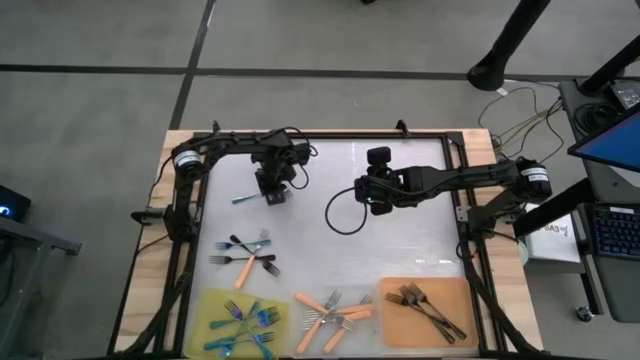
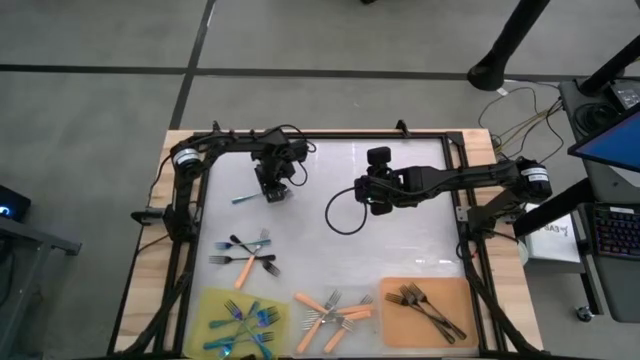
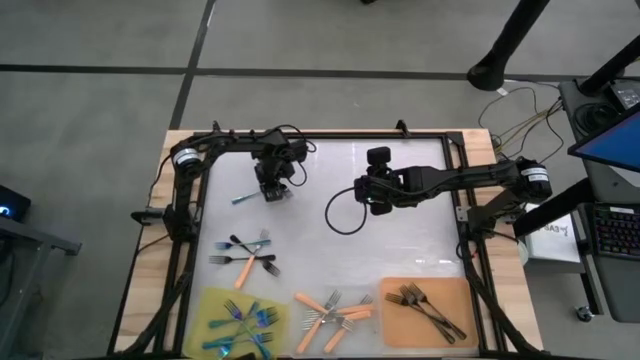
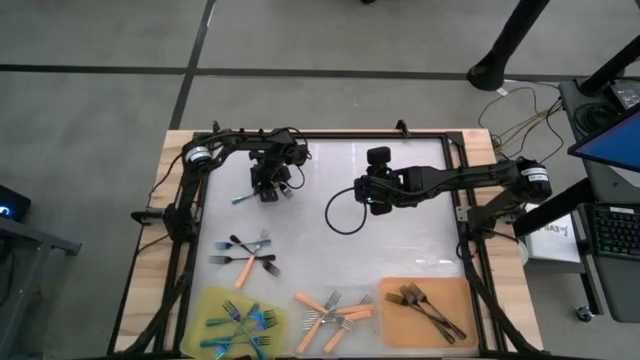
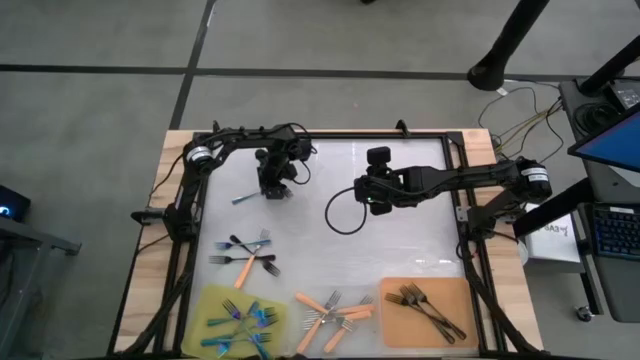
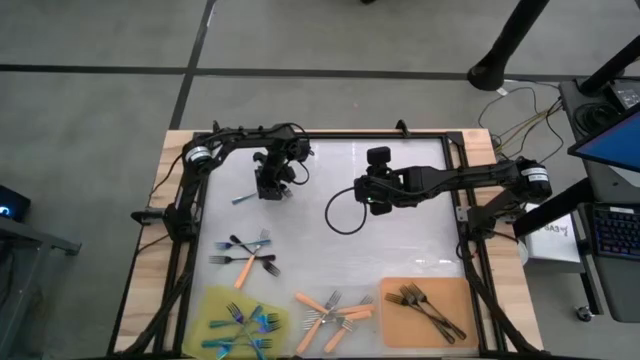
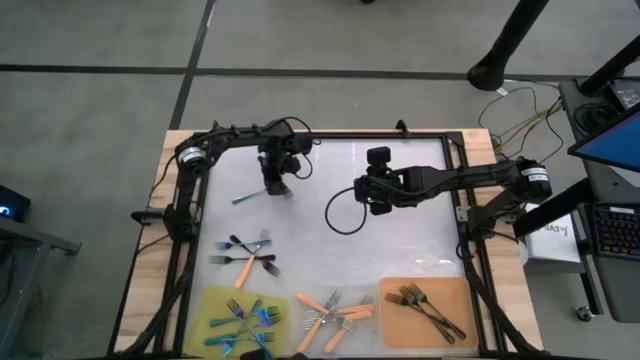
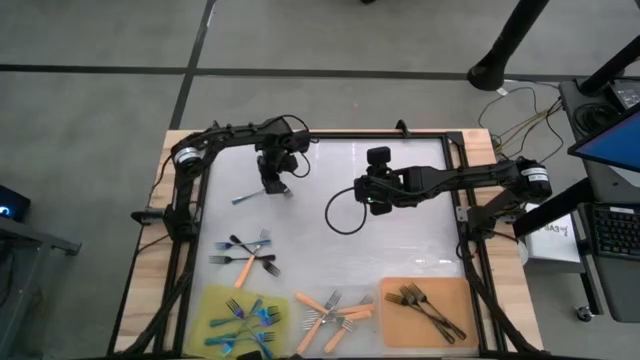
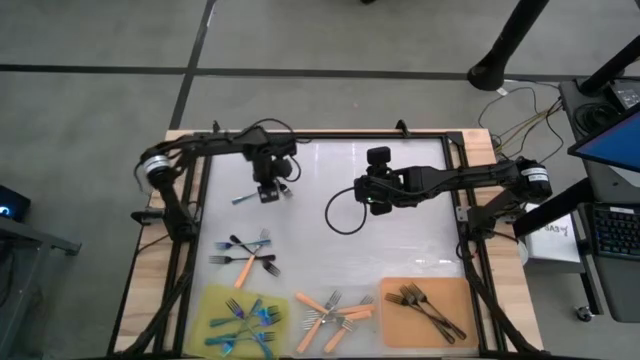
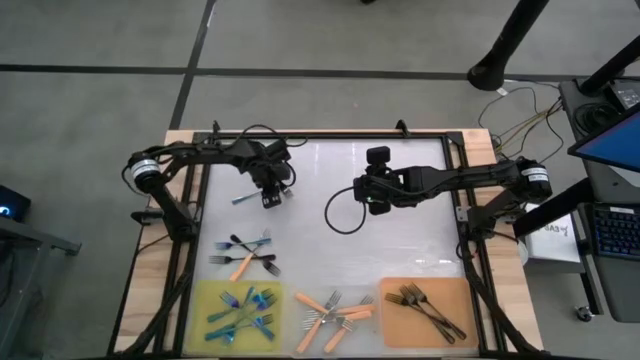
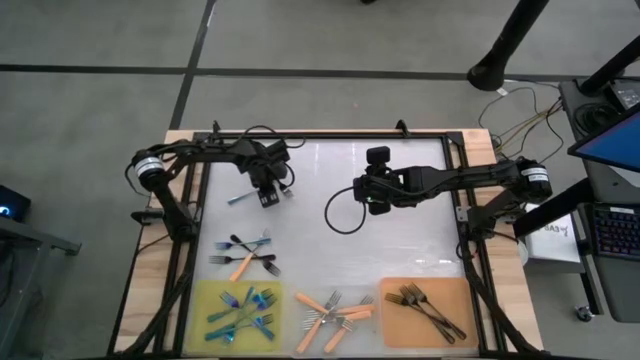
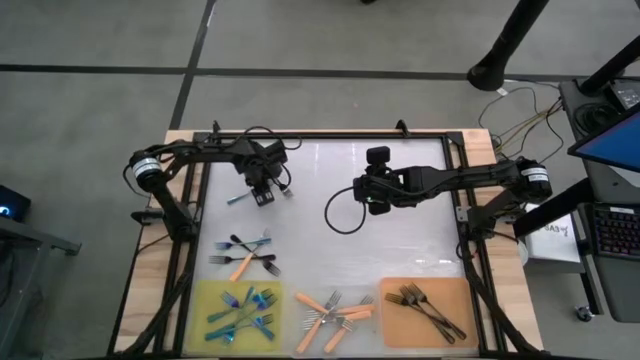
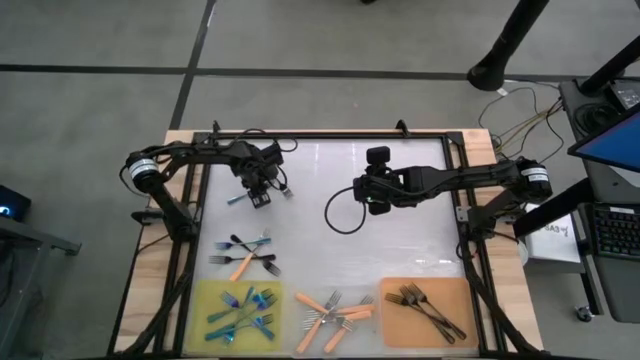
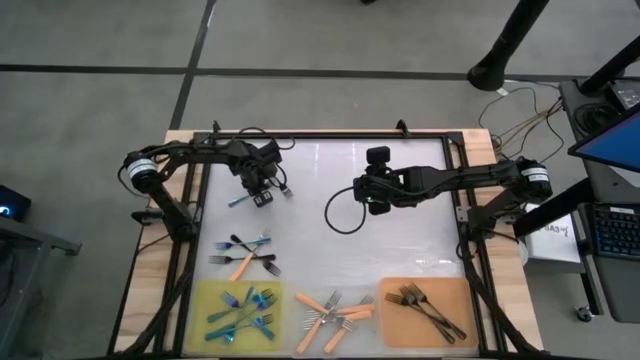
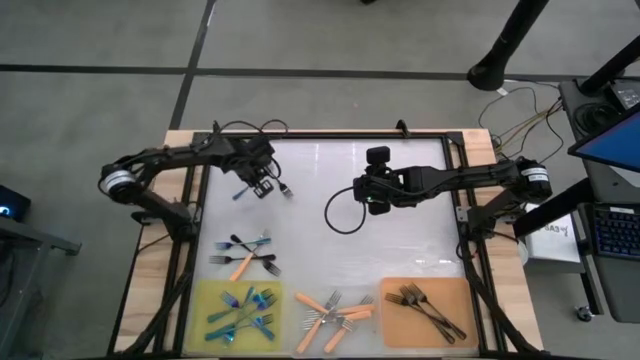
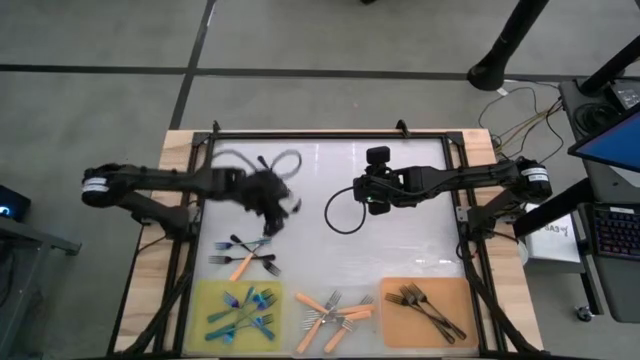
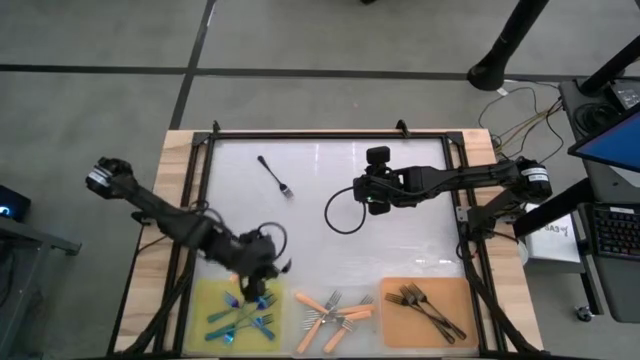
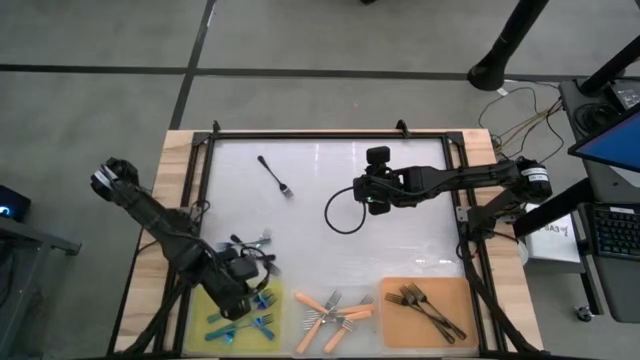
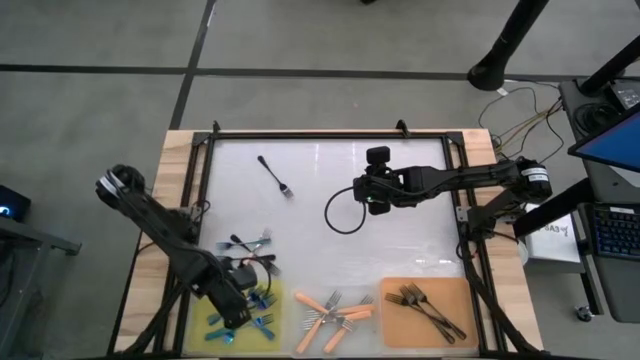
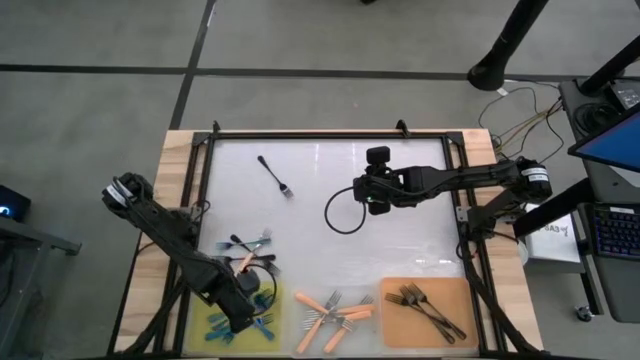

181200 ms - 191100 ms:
Task: Sort silverware by color (type)
Put the black fork into the orange bin

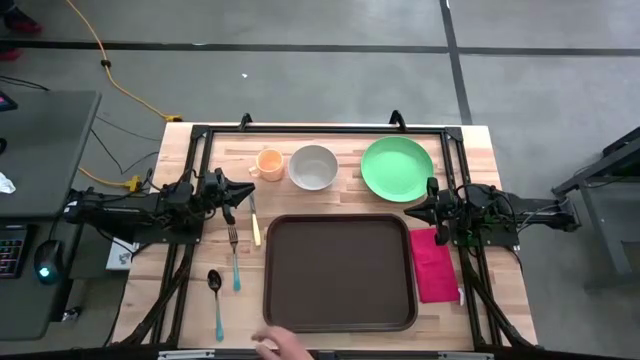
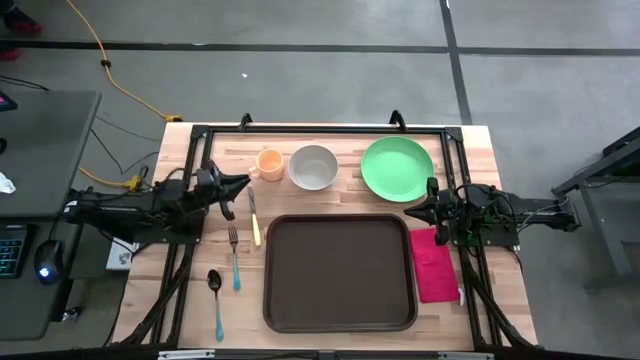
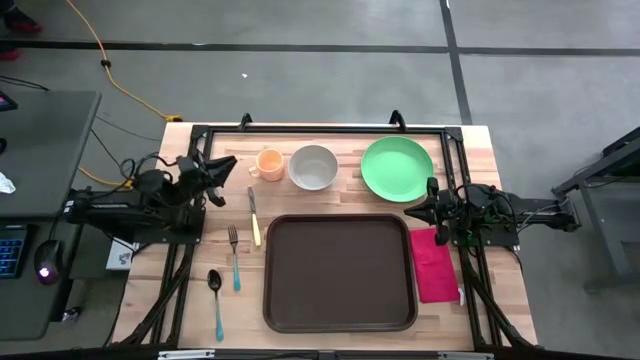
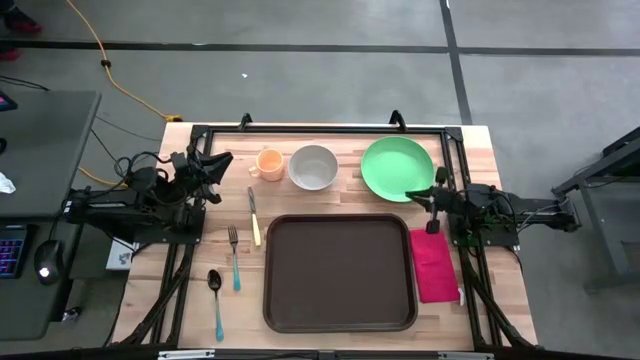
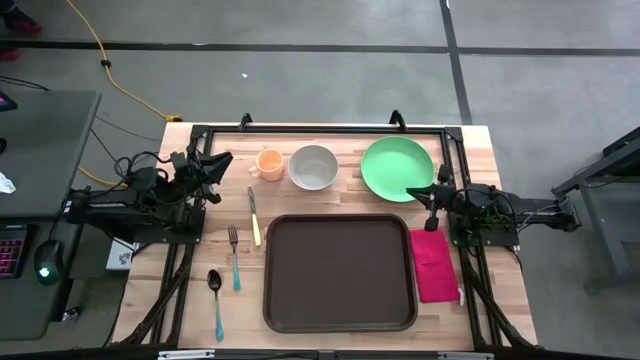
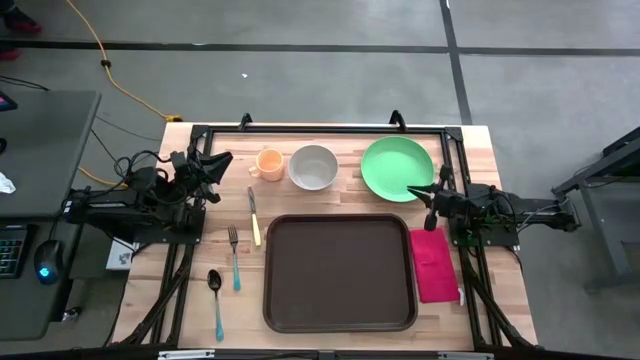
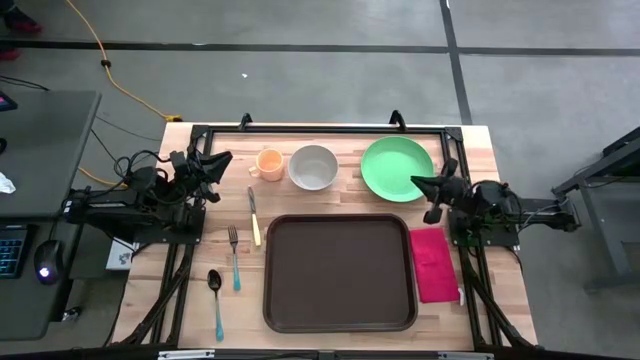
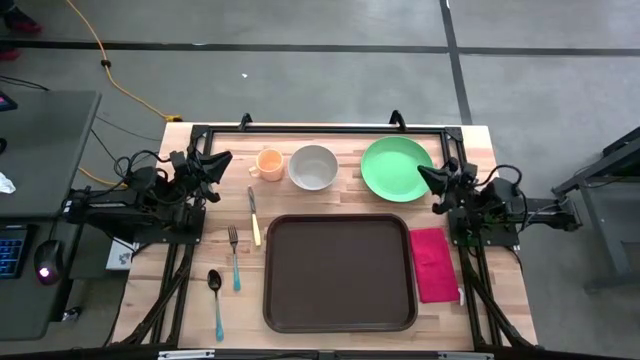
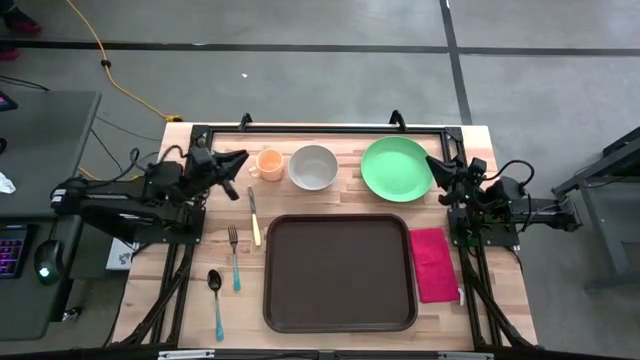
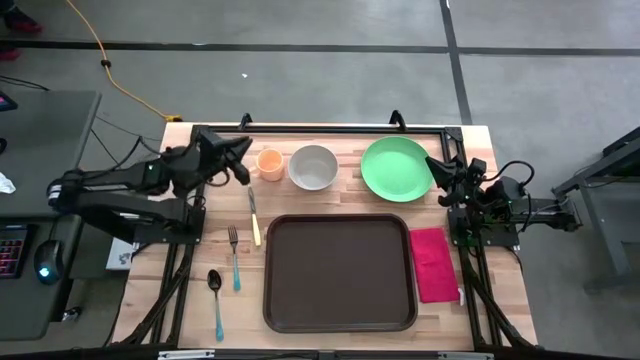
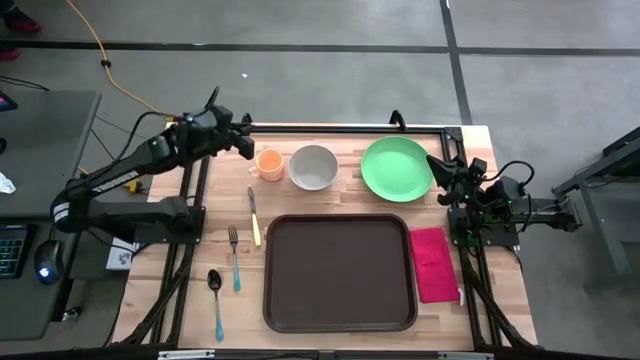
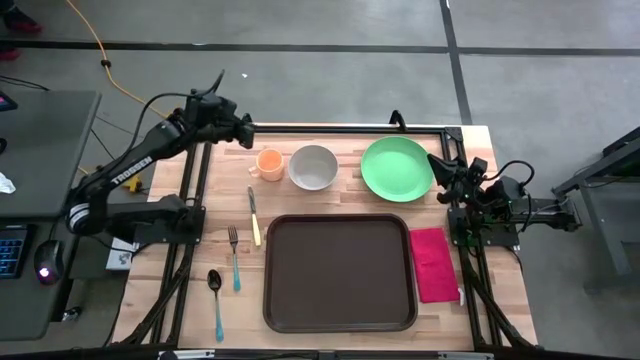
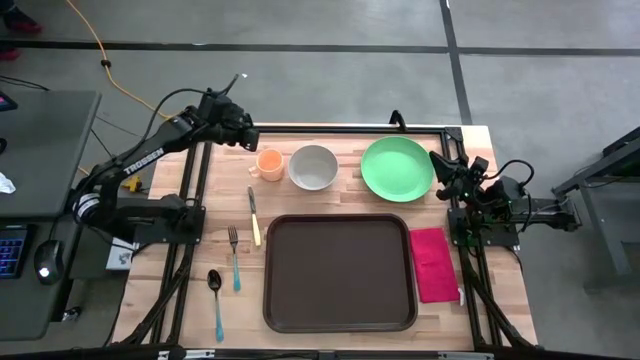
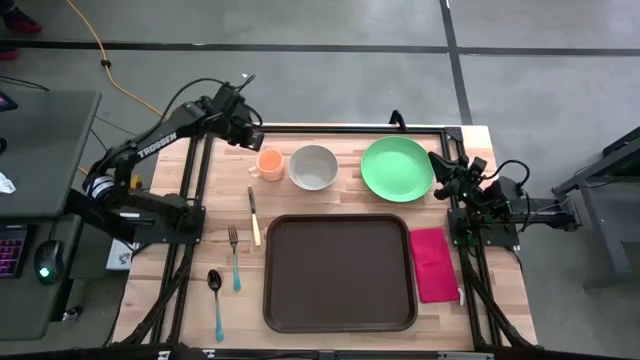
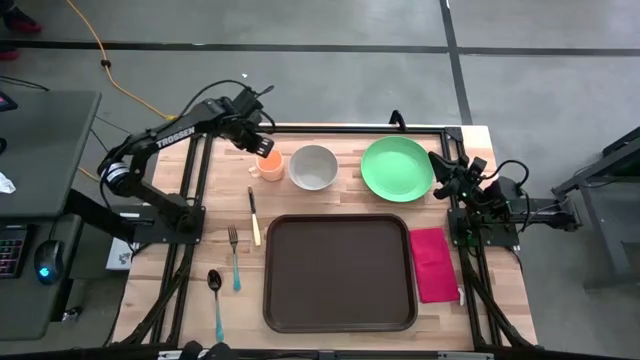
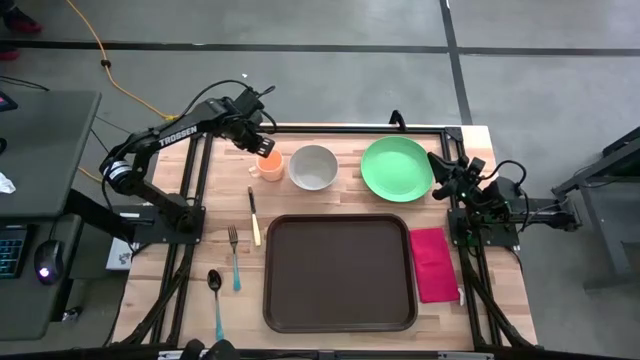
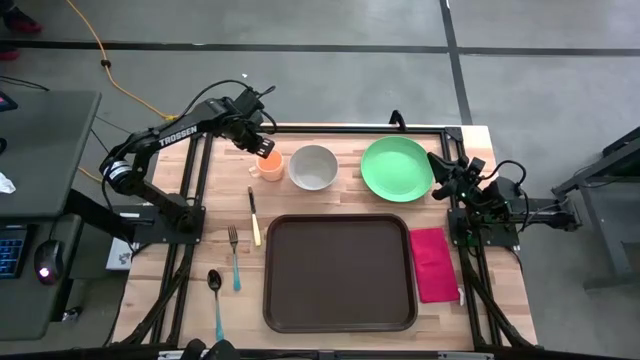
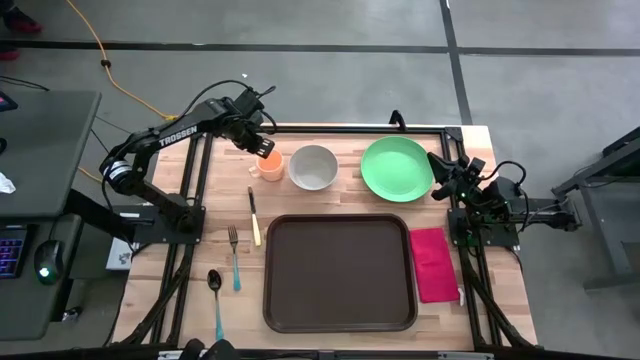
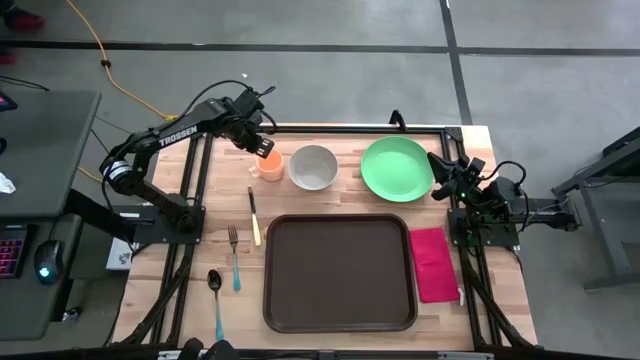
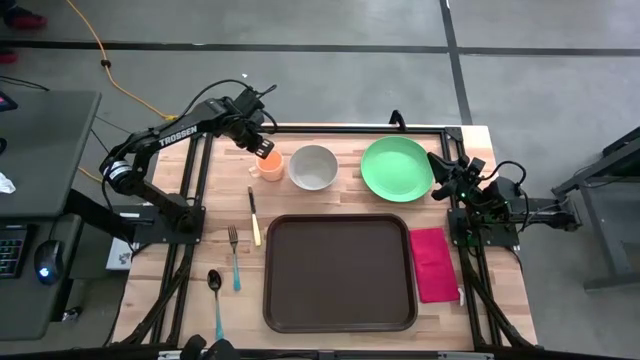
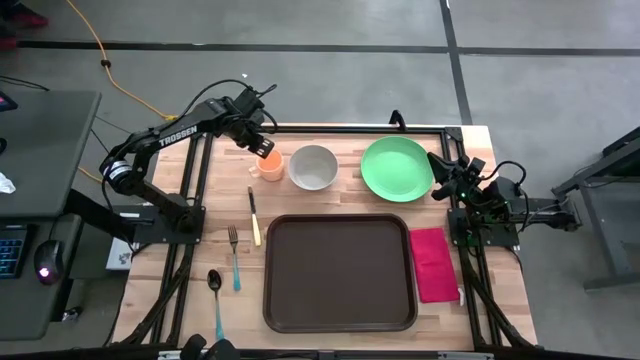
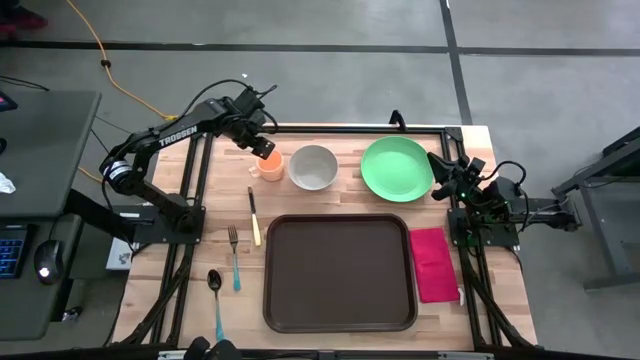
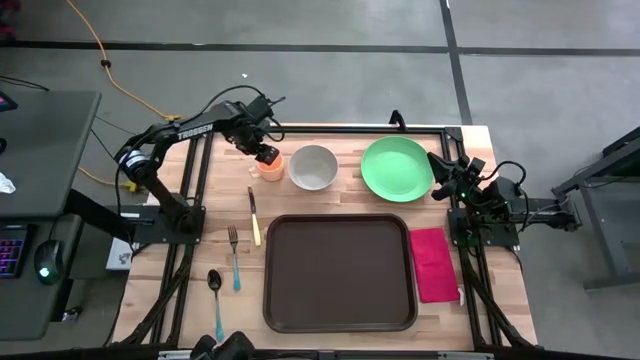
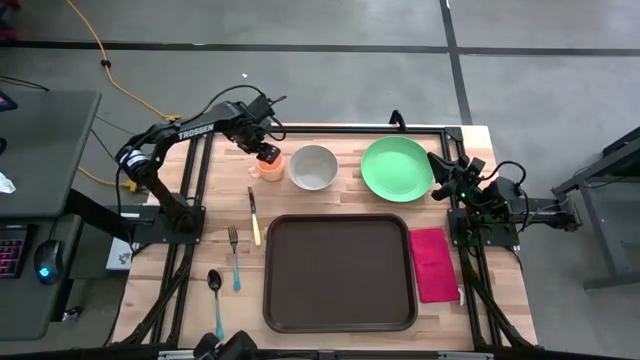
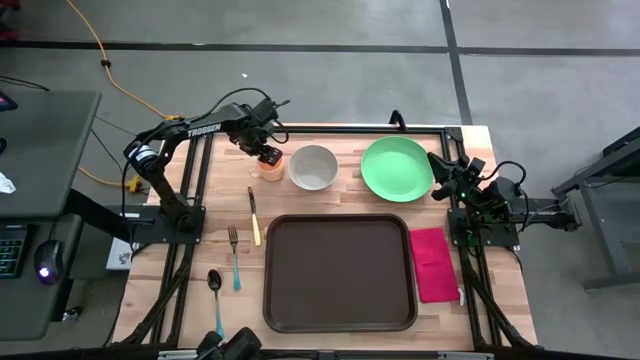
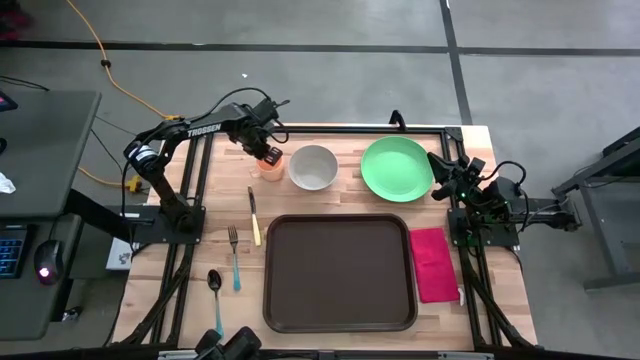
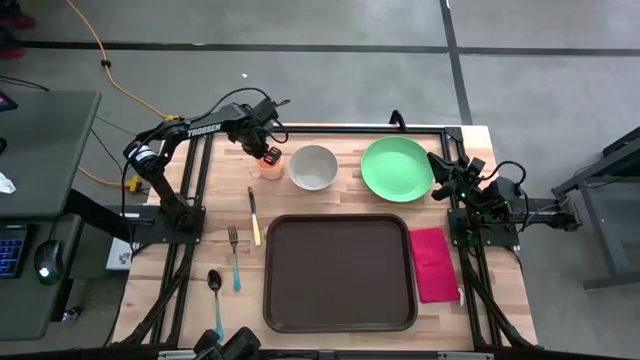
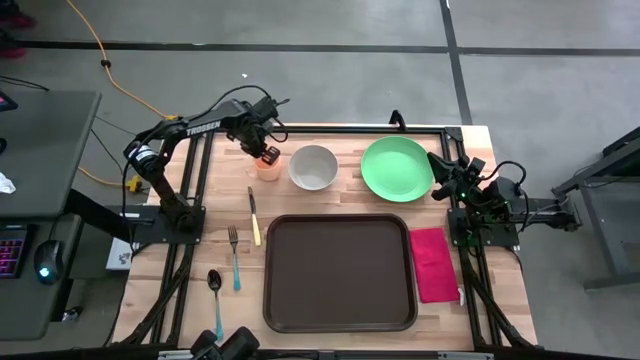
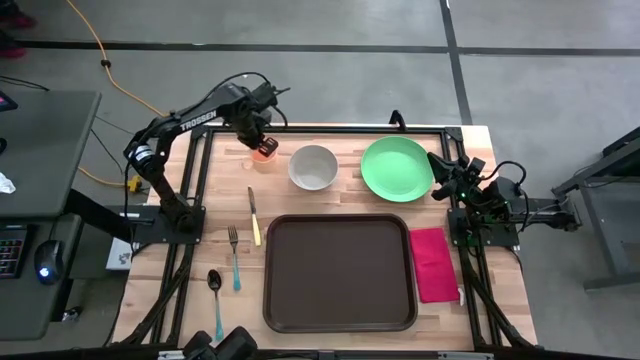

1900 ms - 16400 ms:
Task: Set up tray
Put the peach mug on the black tray
